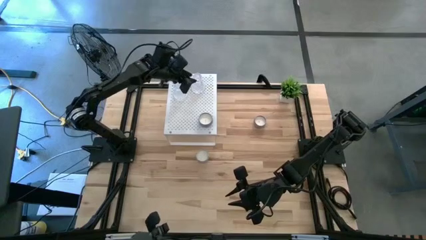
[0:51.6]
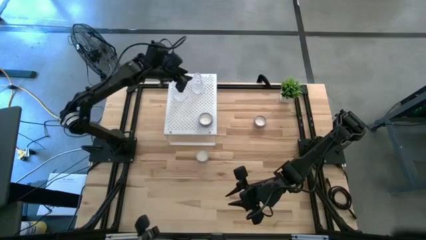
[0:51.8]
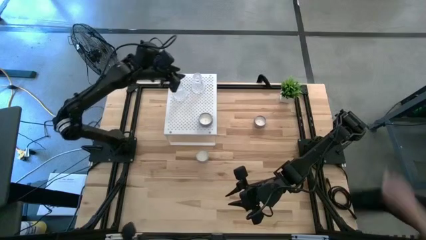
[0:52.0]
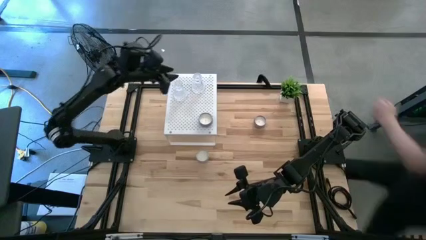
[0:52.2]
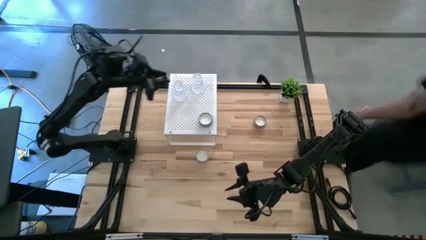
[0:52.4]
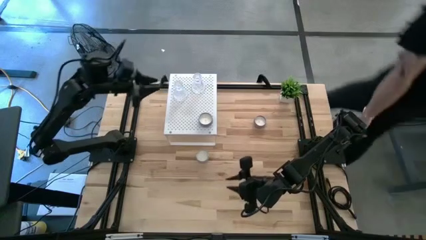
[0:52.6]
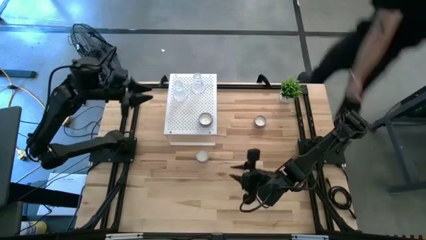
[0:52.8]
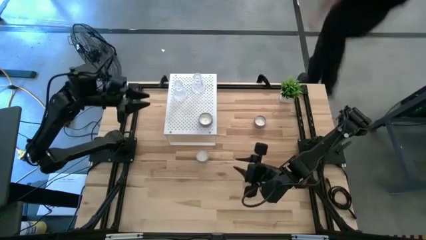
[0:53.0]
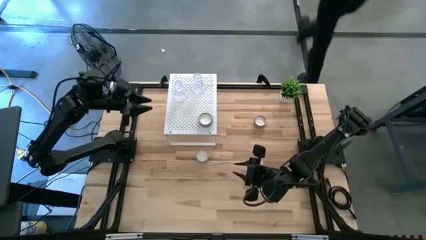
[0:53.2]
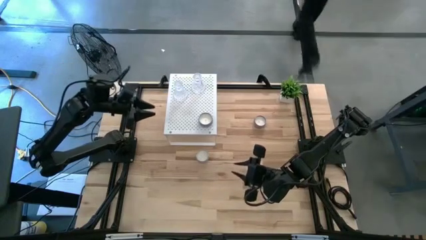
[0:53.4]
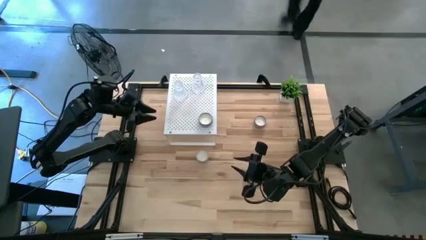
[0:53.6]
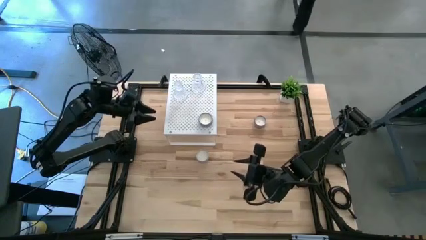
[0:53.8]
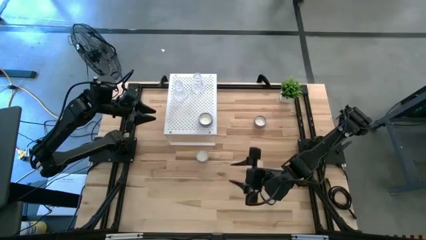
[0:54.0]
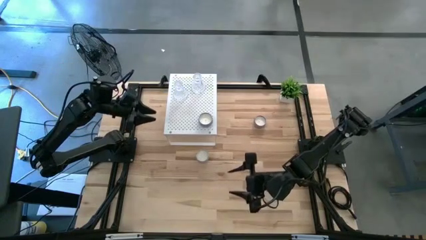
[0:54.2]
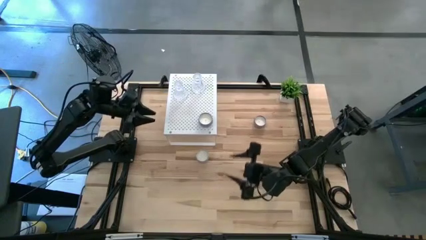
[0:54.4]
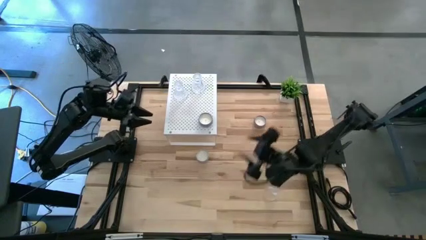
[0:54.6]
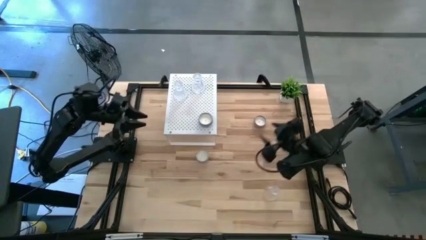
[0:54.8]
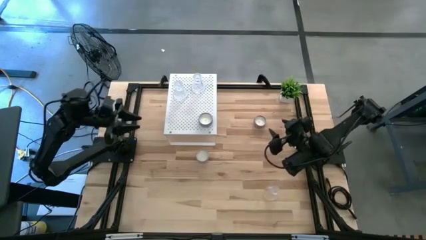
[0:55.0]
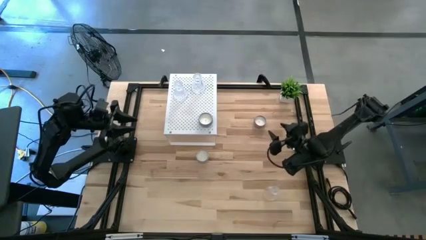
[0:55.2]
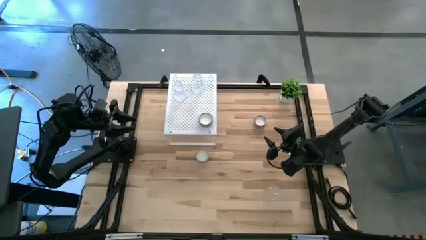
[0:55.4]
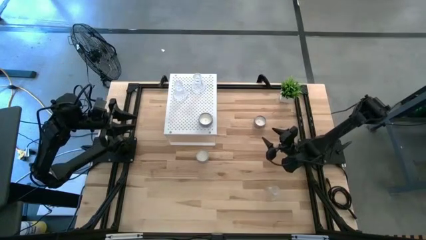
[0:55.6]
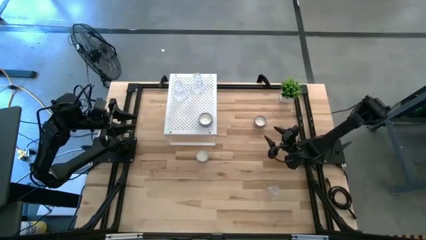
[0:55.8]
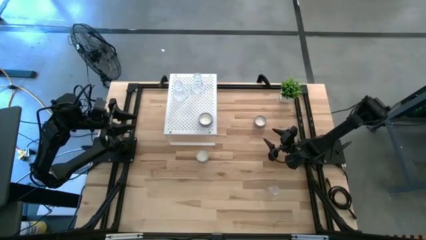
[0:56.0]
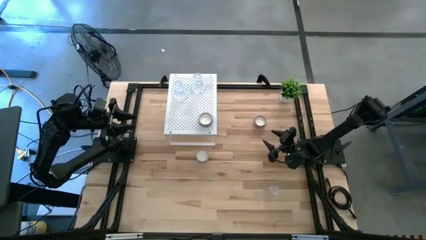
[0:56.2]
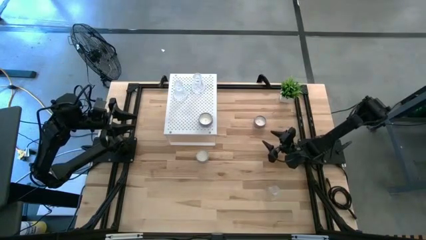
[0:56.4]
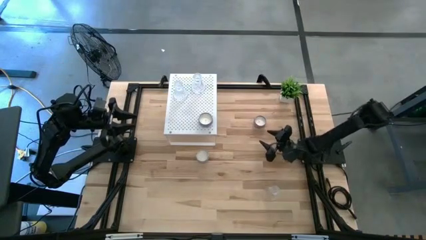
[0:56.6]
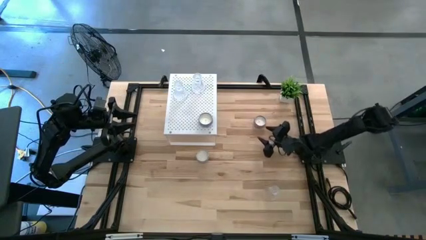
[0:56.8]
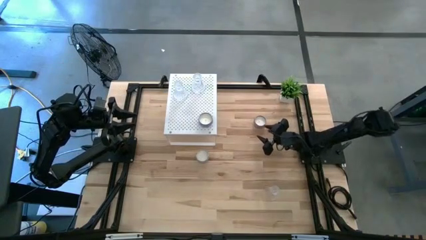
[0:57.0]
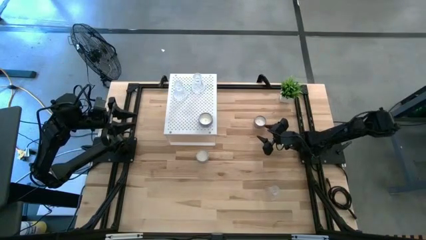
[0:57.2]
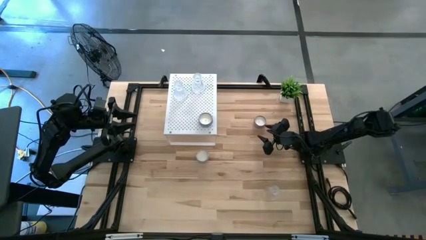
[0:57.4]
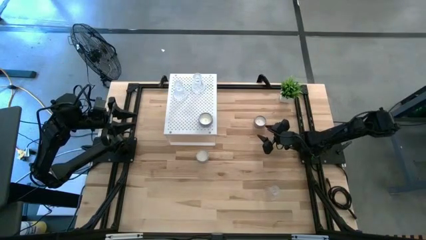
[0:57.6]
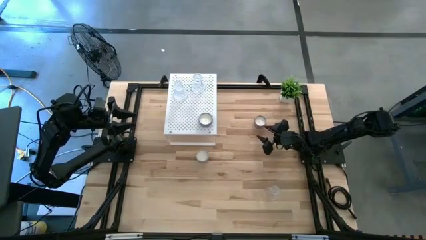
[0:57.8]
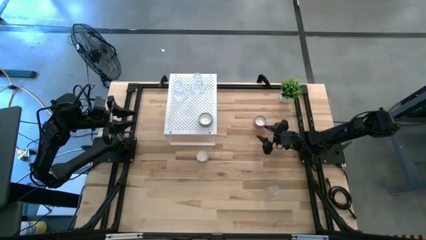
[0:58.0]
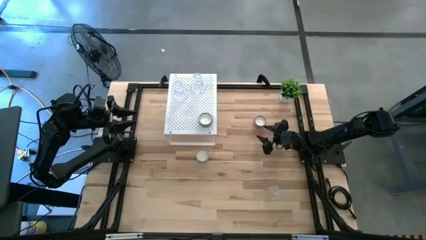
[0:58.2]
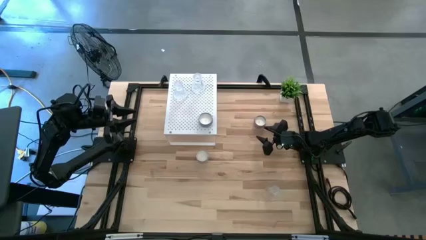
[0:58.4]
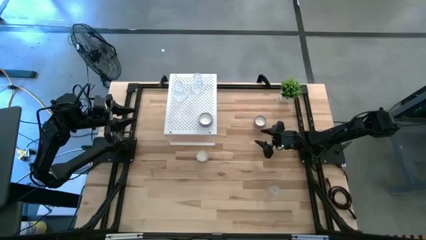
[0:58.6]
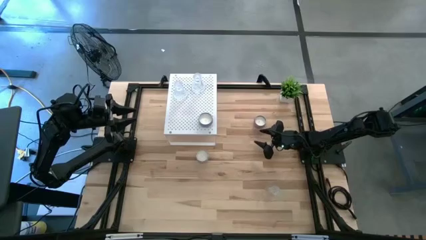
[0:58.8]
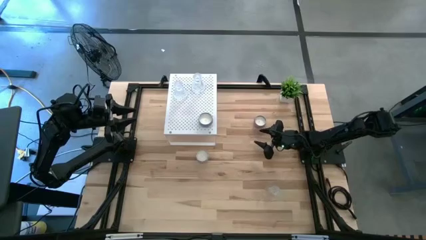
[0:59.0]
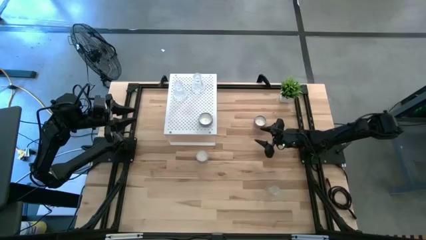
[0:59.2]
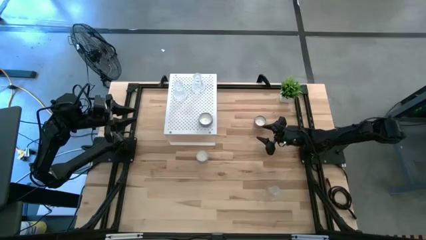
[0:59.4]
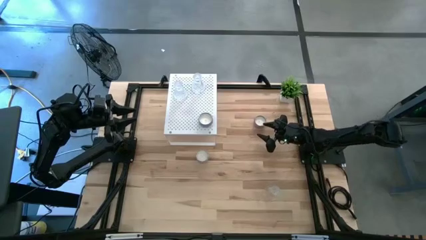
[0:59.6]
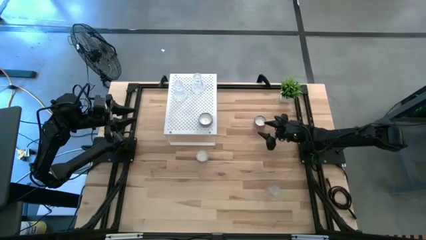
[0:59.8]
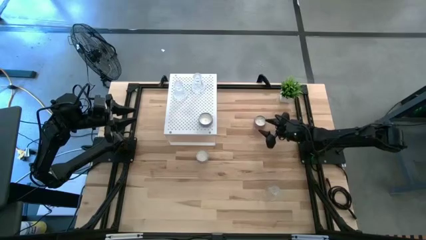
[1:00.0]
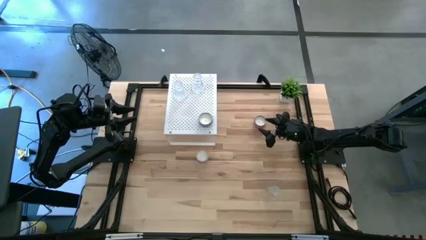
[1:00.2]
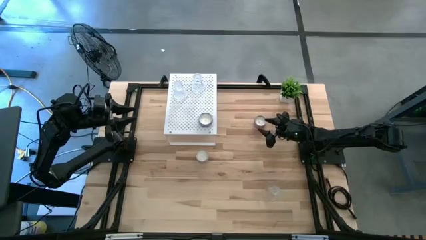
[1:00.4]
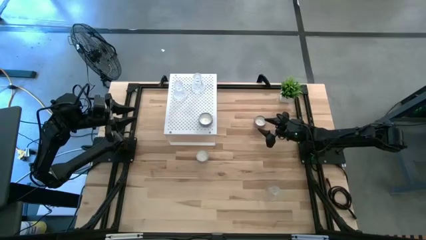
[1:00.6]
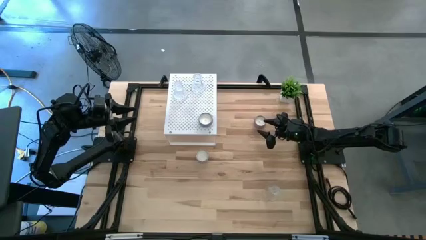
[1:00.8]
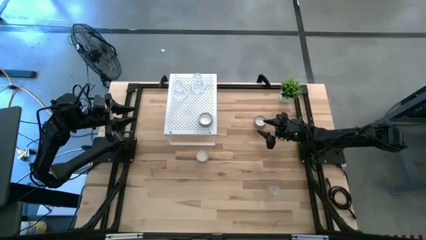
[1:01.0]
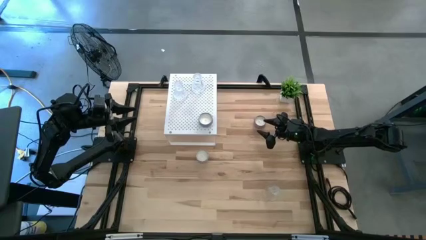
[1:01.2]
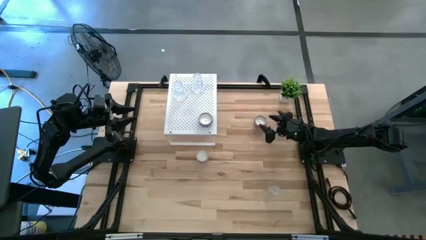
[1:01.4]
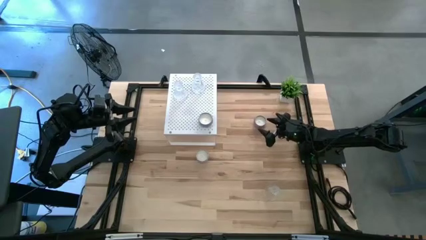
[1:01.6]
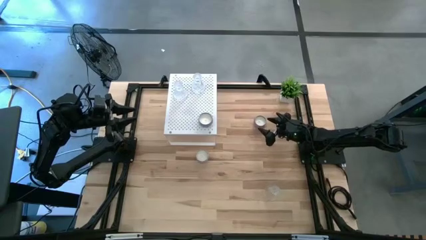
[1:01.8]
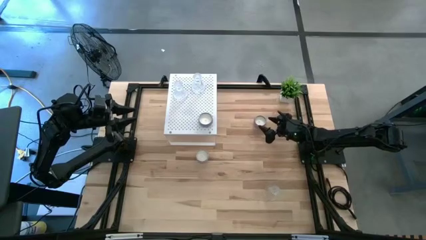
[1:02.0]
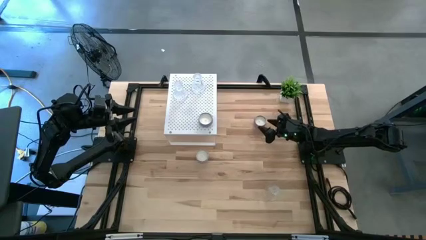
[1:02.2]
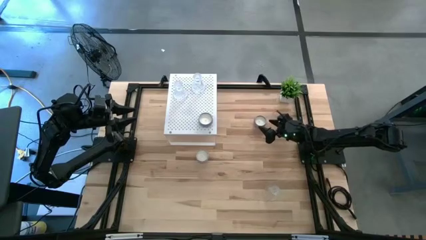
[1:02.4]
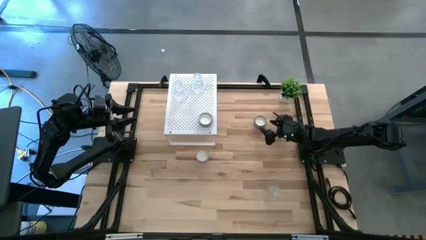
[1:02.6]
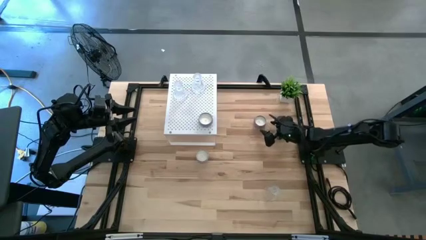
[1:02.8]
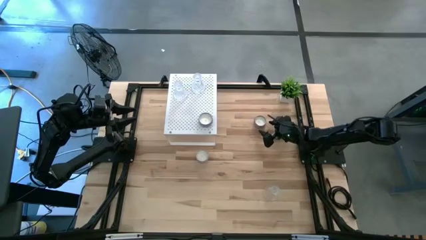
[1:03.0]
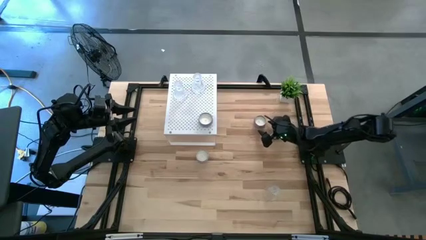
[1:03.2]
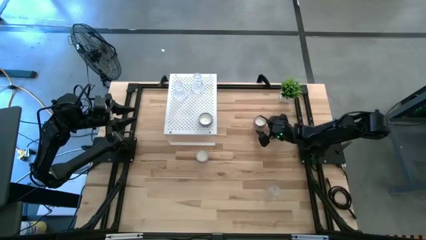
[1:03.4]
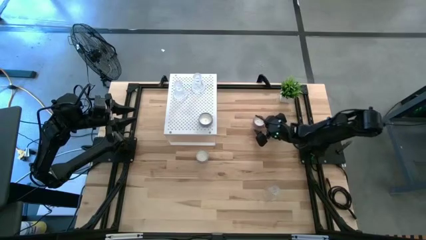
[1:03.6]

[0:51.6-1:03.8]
Task: Pick & Place candle stick holders
Put the violet candle on the shelf
